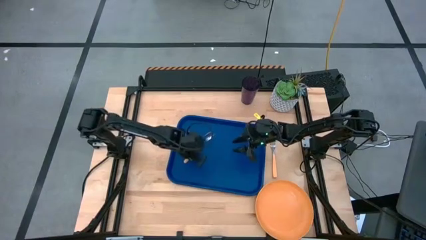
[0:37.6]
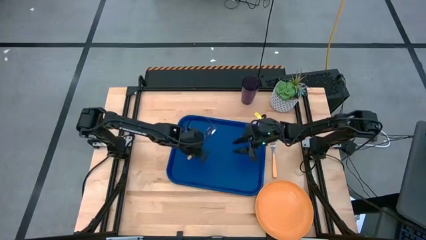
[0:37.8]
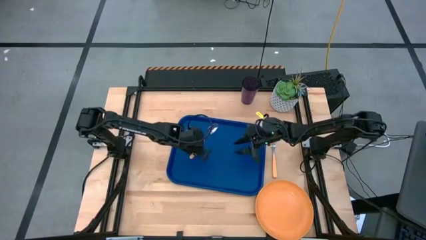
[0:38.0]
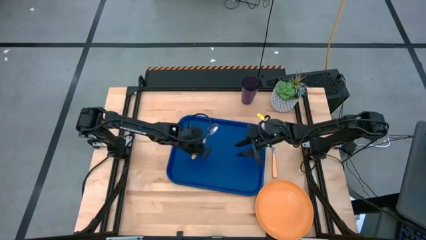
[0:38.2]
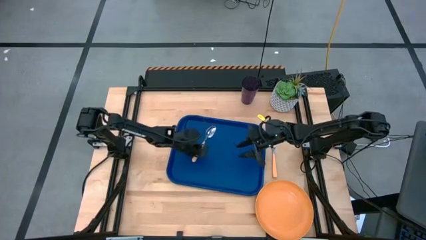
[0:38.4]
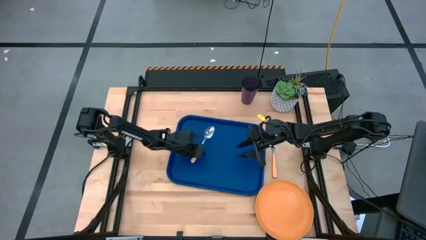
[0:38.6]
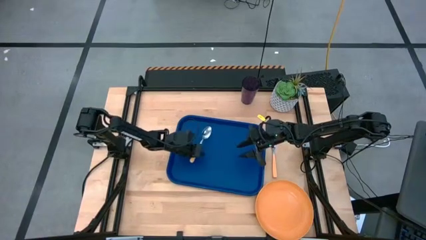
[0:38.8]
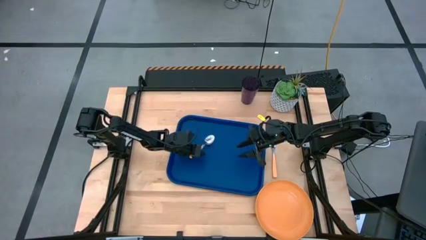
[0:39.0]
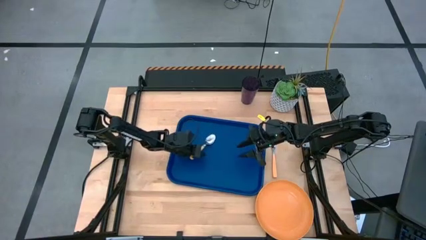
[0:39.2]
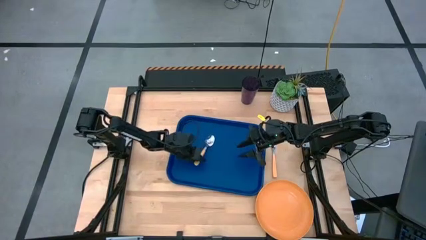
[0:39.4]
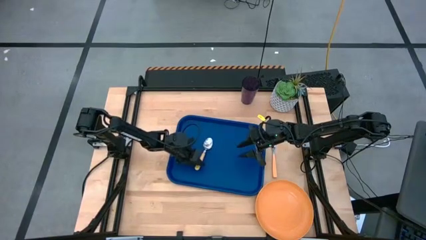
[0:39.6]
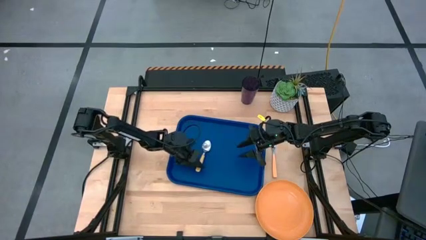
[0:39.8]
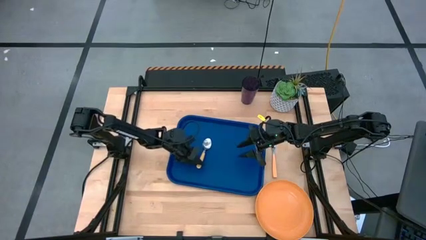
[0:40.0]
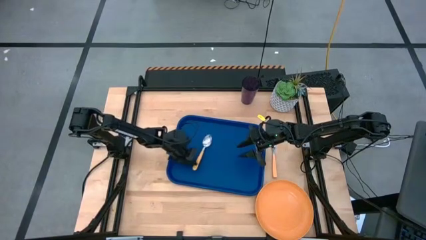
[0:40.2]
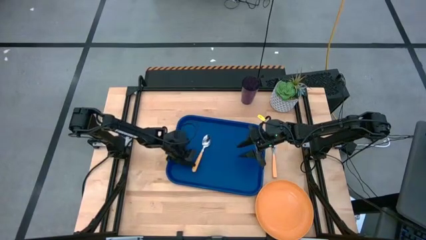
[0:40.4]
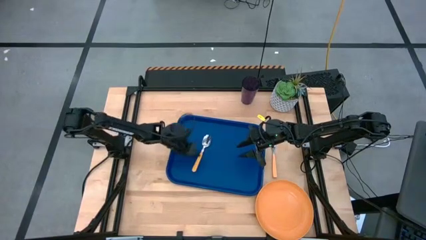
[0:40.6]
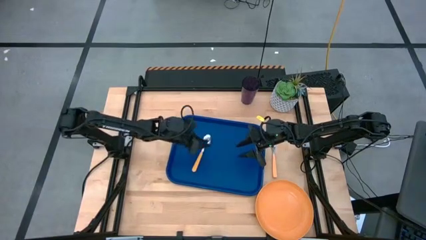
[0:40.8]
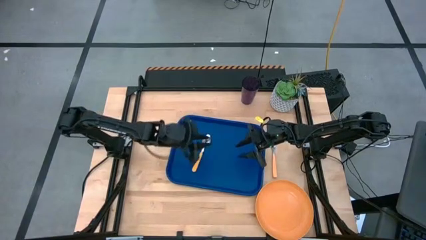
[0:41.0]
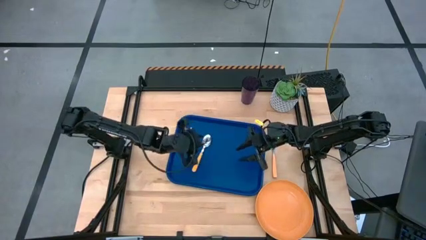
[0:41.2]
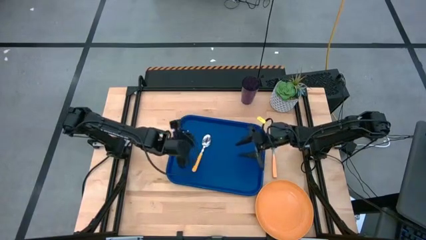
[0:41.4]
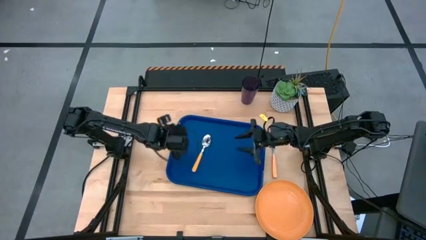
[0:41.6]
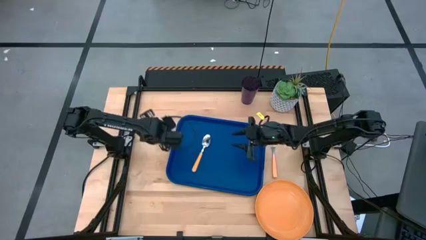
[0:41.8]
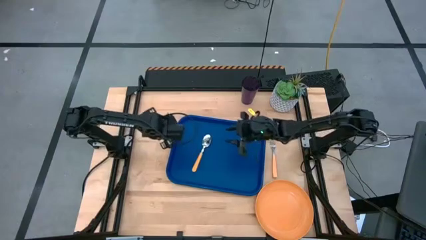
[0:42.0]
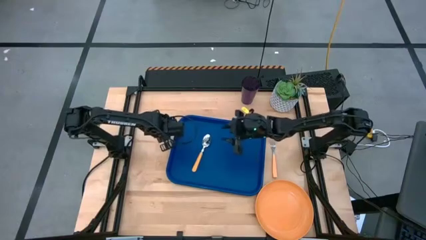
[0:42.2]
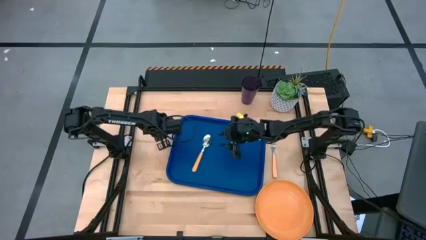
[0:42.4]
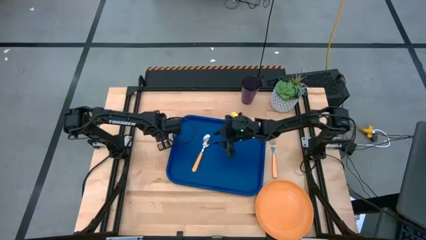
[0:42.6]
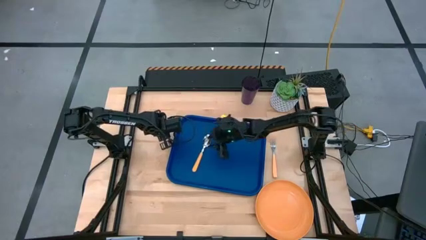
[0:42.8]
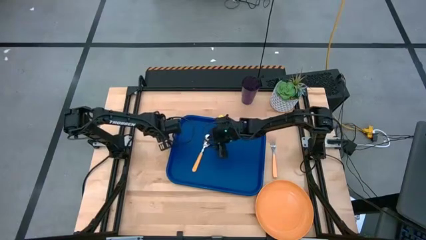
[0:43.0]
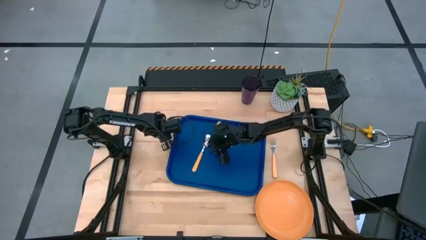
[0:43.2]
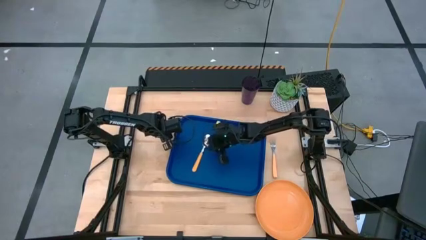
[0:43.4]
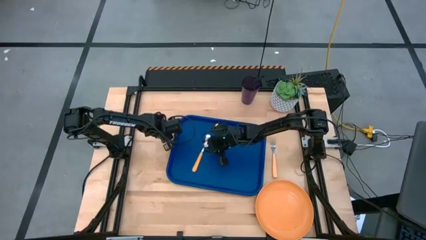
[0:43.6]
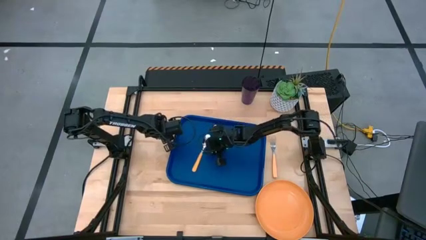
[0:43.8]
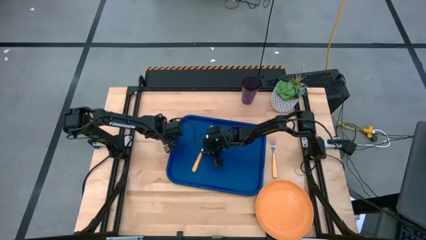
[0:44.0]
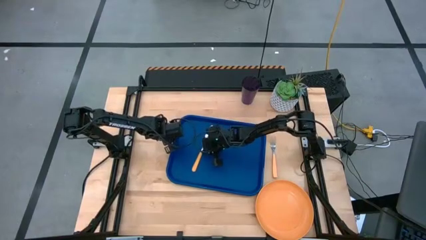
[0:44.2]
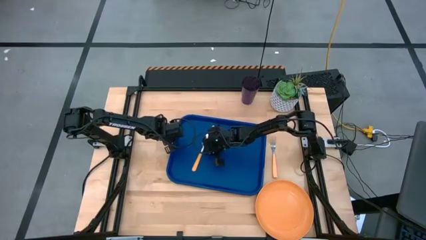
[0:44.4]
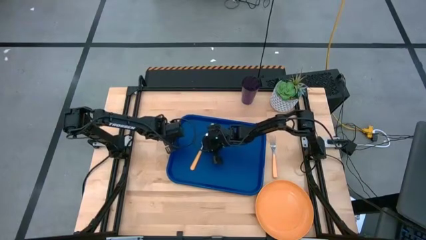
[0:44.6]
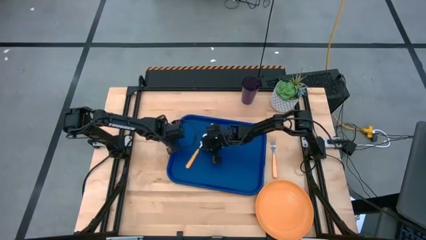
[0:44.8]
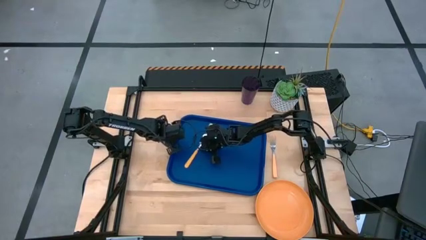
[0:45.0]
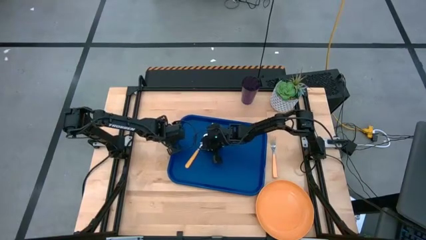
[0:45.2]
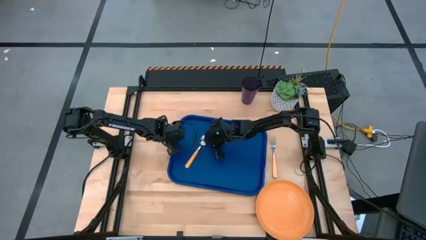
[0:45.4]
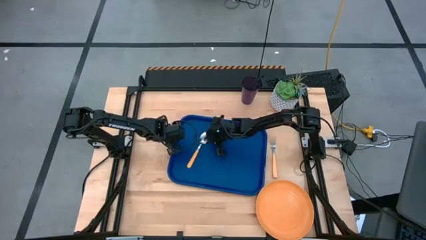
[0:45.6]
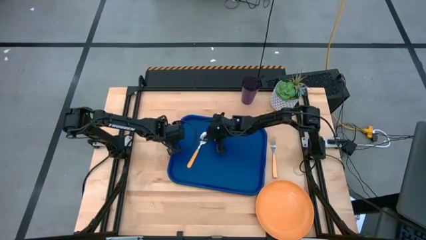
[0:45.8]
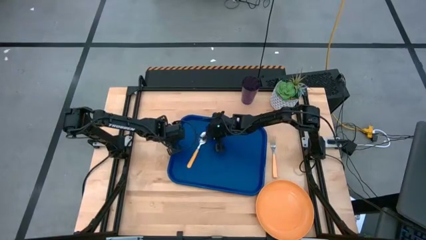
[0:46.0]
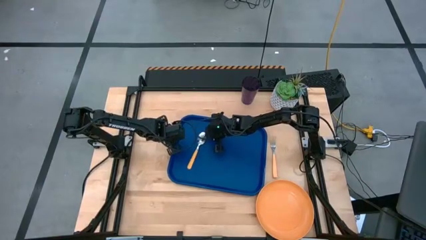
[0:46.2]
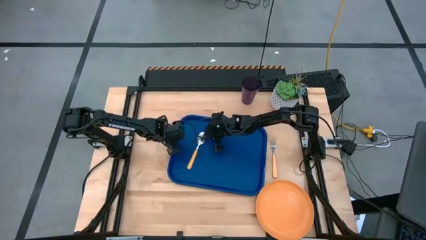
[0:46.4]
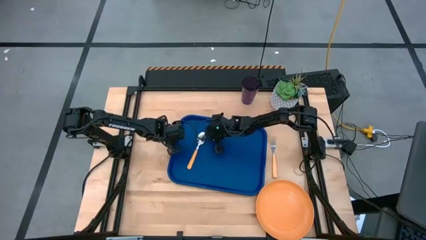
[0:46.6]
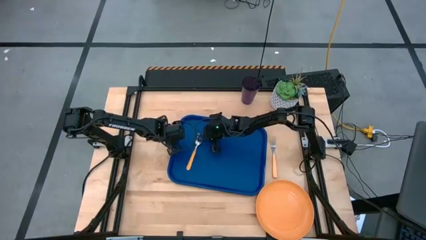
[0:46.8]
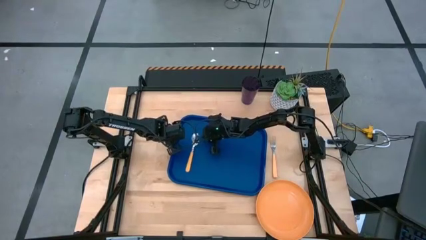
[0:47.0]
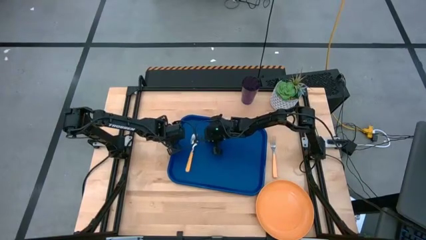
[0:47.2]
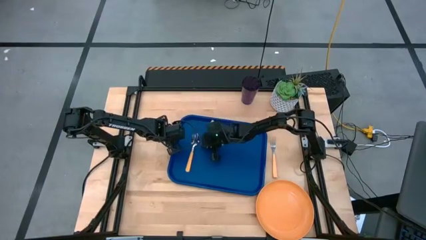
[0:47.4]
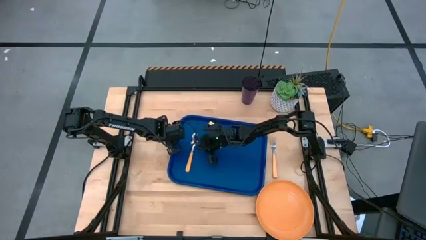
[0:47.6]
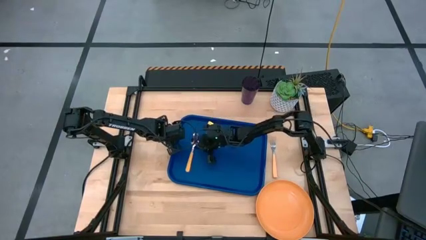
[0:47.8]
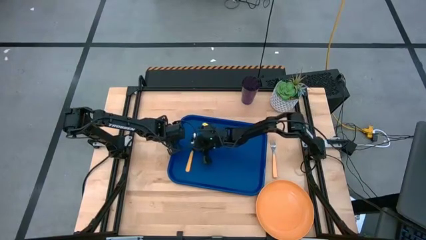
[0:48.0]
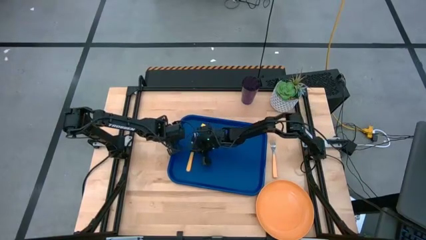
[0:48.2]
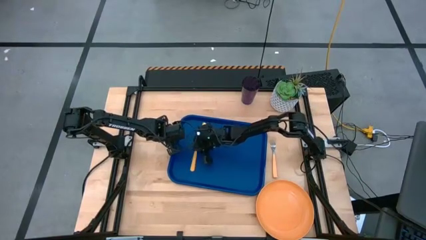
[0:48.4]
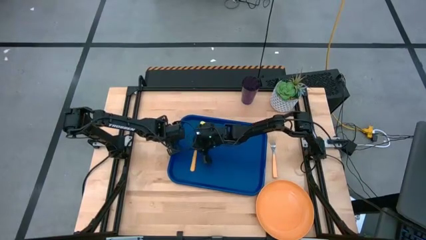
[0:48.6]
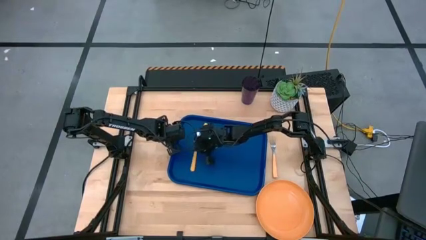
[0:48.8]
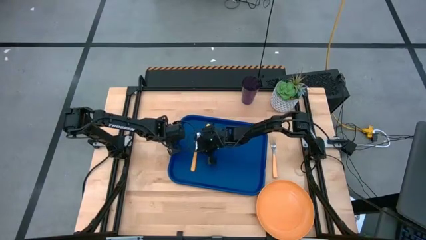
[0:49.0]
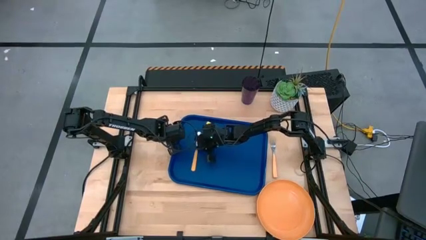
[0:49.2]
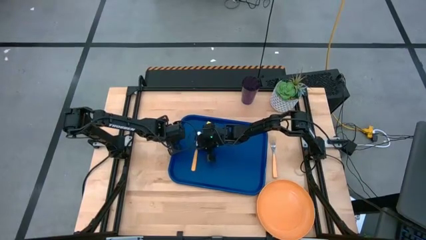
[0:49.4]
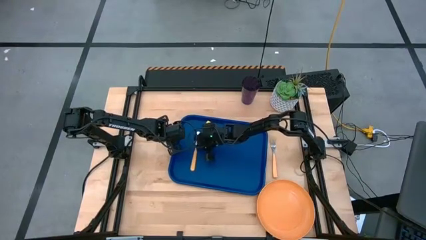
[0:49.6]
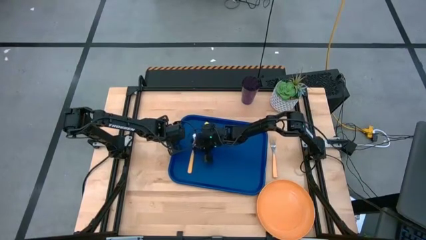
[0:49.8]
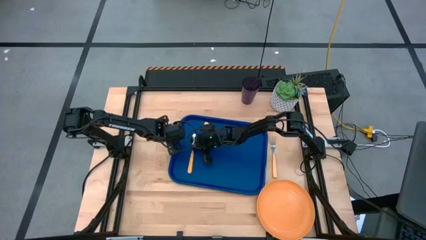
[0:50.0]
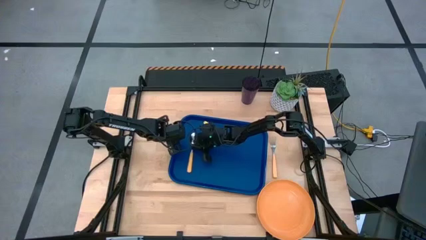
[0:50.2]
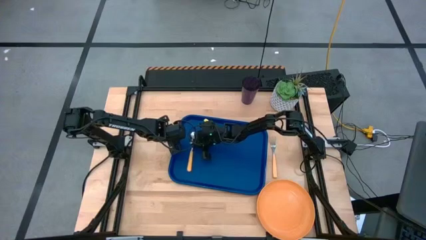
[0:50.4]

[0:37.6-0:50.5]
Task: Pick and place plate/cup/fork/spoon on tray
Put the yellow spoon on the left of the blue serving tray
